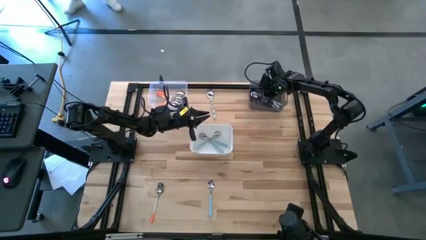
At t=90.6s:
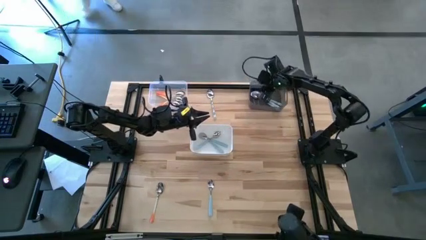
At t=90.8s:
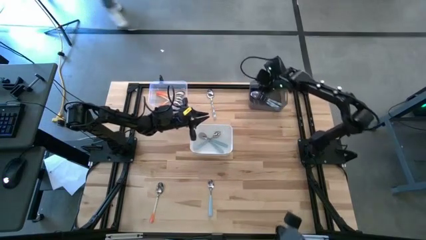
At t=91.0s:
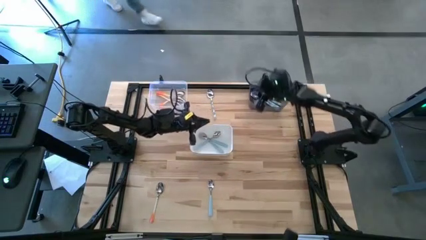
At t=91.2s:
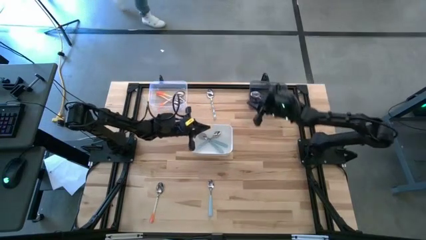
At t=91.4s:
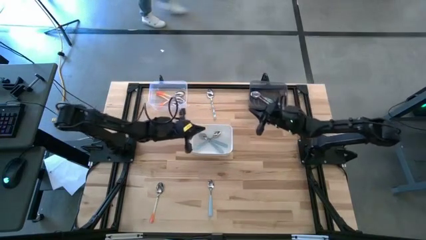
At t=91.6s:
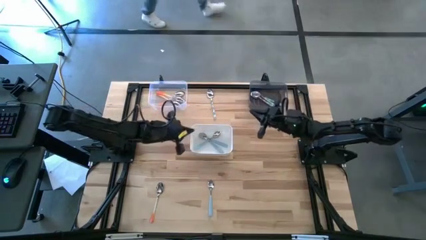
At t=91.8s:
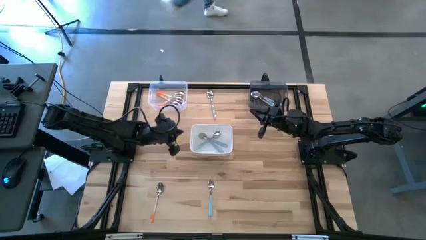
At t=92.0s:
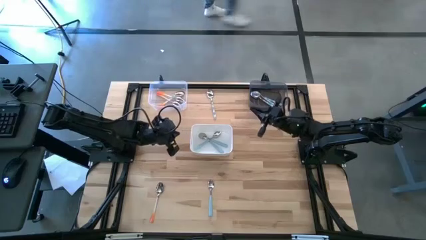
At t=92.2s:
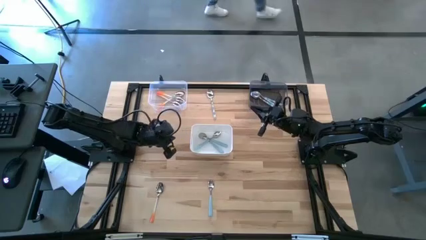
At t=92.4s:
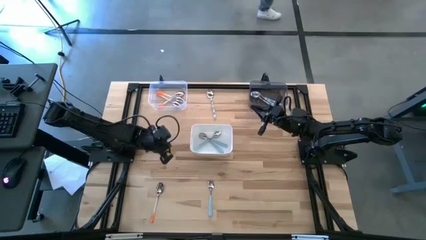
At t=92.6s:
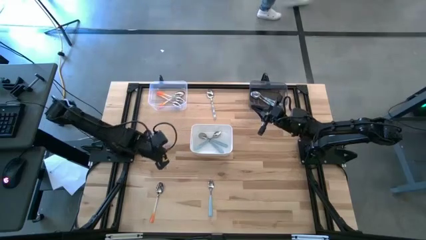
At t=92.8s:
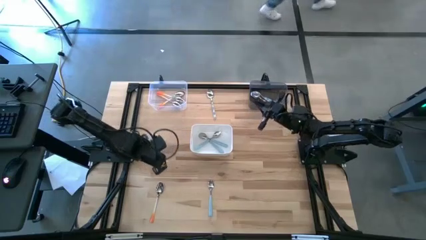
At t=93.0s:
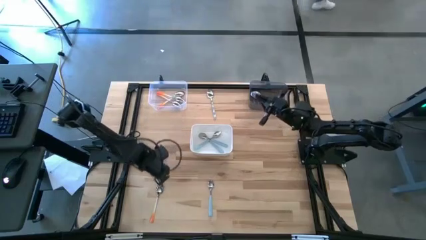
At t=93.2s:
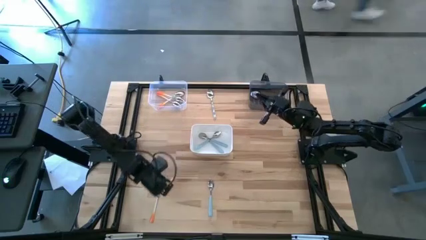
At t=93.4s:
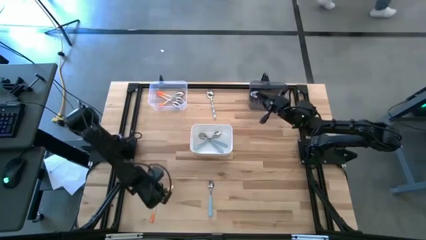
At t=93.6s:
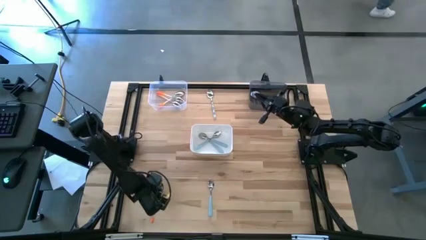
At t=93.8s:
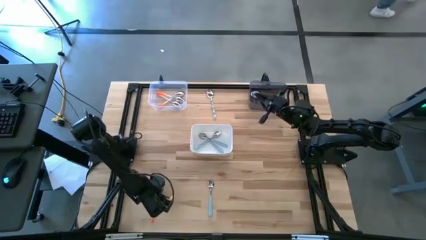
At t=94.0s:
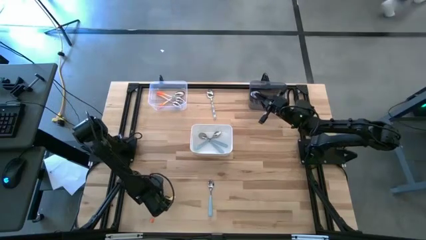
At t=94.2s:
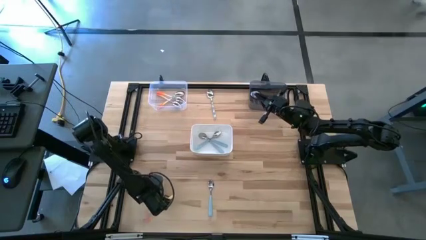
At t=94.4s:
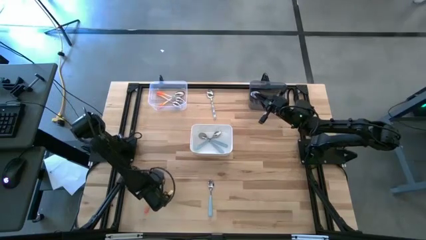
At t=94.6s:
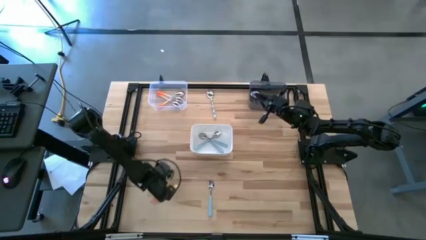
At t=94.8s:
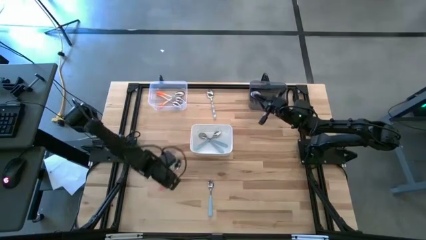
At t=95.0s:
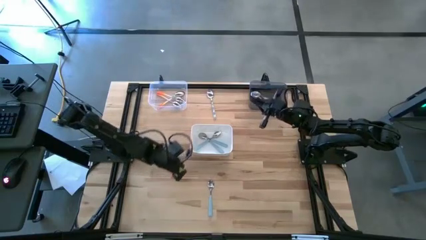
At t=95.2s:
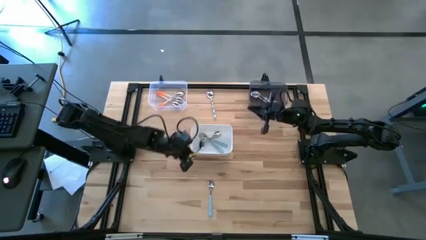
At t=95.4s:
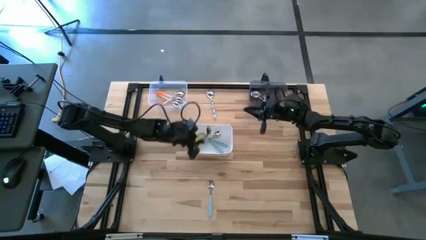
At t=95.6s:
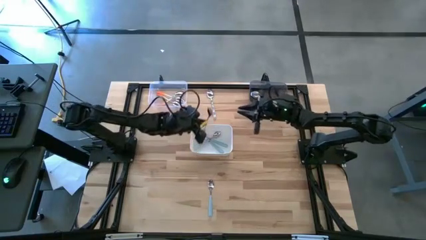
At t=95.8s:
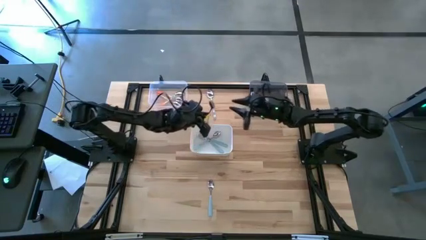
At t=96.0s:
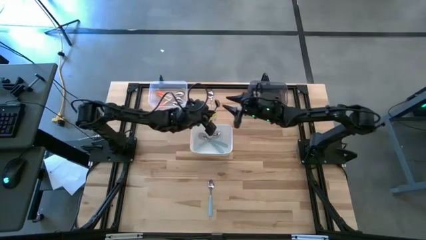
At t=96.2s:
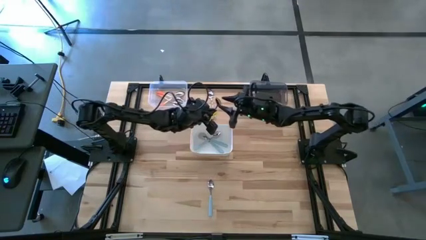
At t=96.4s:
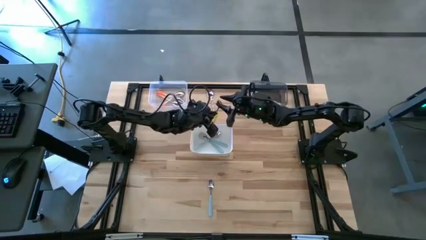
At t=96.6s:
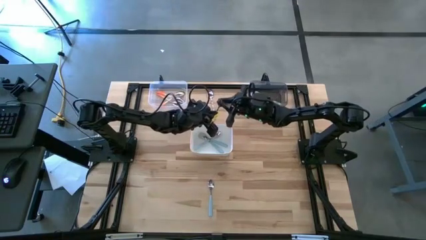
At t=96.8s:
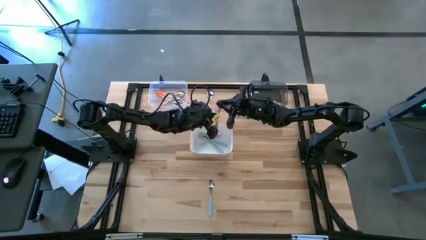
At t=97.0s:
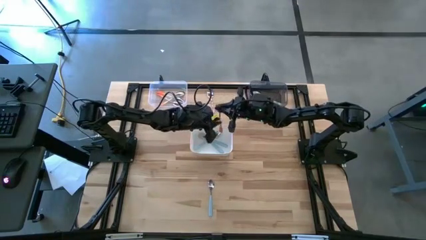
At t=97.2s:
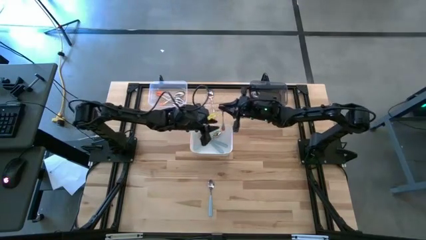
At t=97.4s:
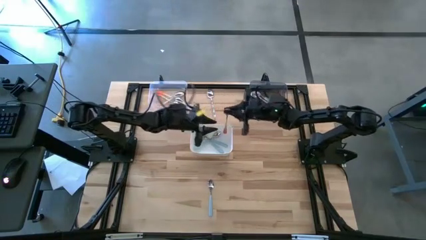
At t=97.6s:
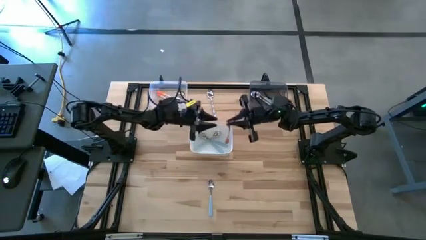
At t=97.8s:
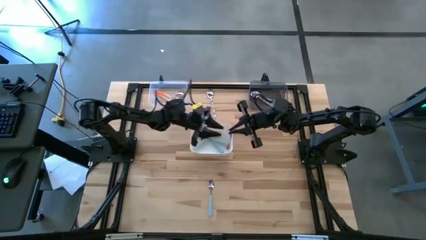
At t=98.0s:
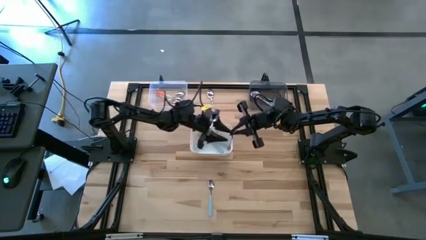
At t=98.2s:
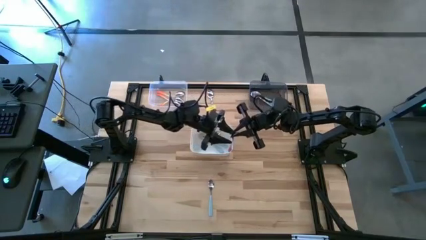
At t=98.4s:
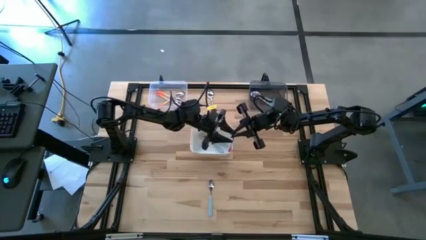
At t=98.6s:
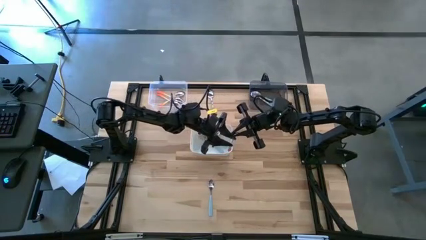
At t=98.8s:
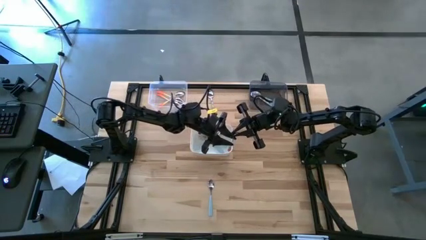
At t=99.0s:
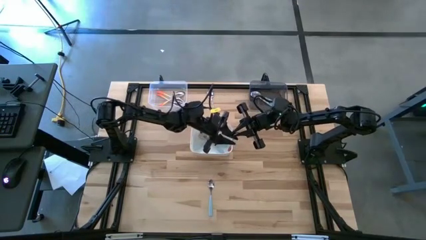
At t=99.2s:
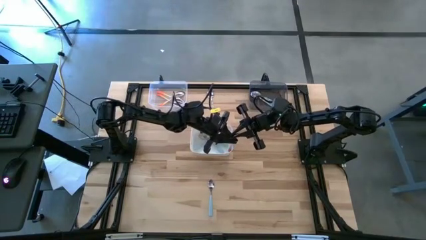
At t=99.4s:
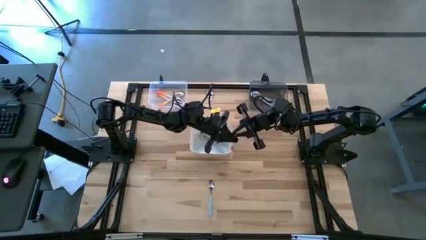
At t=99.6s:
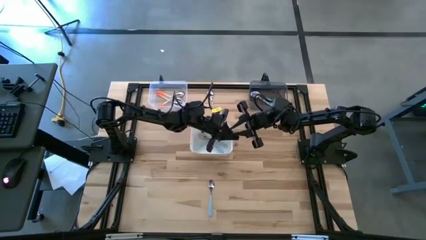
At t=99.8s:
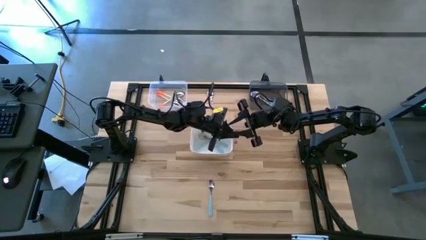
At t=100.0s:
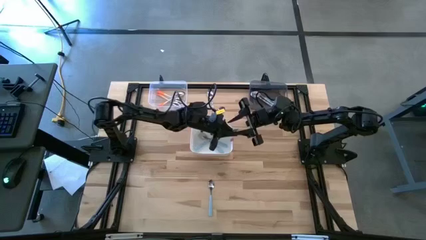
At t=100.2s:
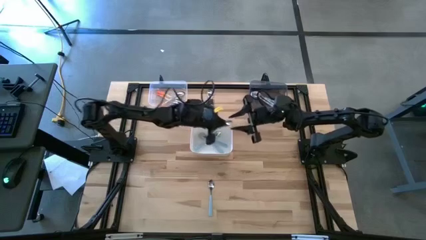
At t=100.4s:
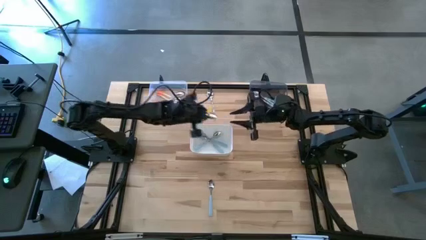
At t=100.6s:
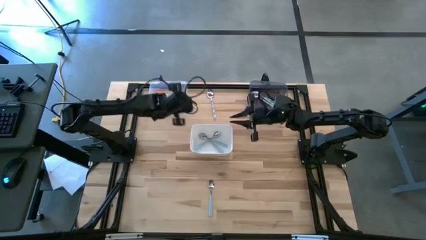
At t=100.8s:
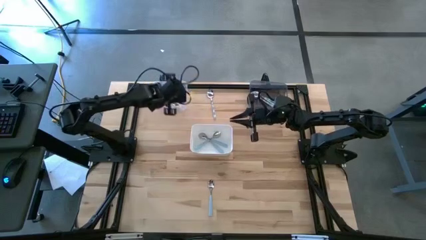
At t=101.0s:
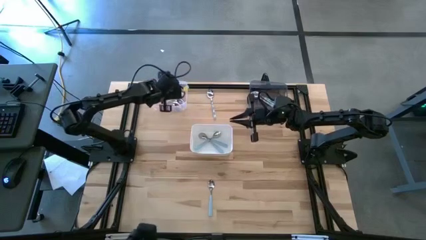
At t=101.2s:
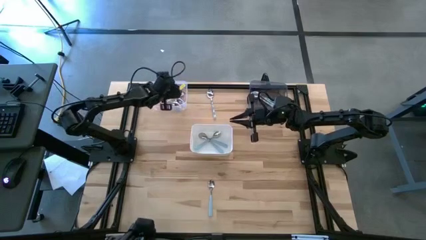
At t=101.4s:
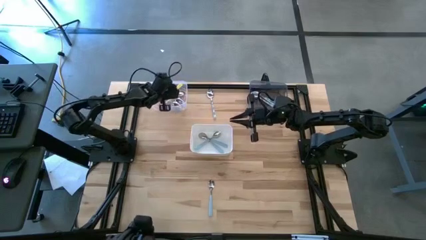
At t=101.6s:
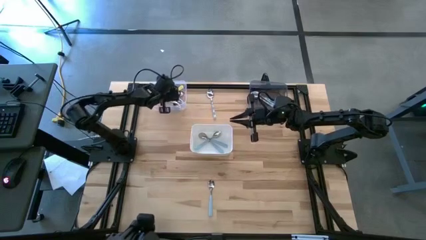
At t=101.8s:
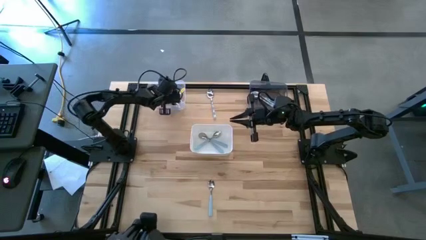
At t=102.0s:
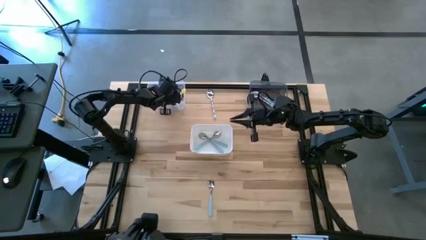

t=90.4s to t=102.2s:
Task: Sort silverware by color (type)
Put the orange spoon into the transparent bin

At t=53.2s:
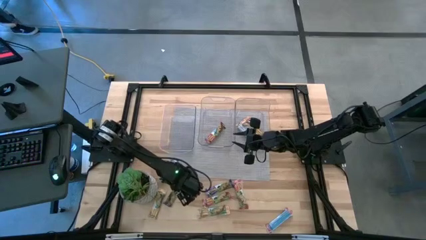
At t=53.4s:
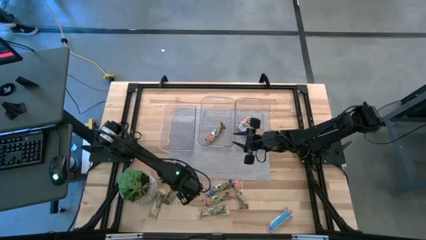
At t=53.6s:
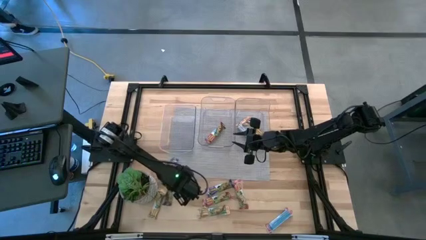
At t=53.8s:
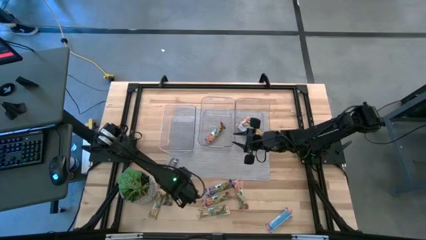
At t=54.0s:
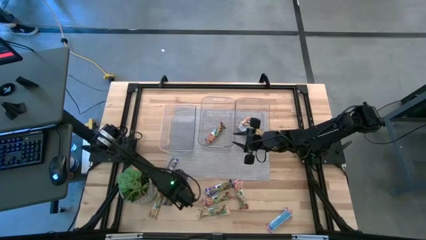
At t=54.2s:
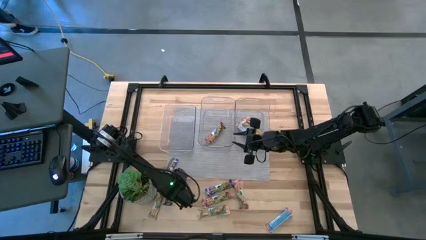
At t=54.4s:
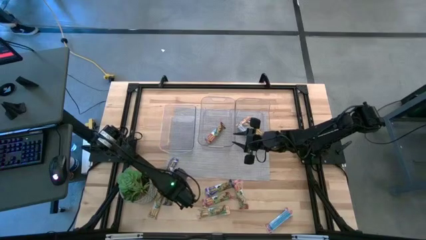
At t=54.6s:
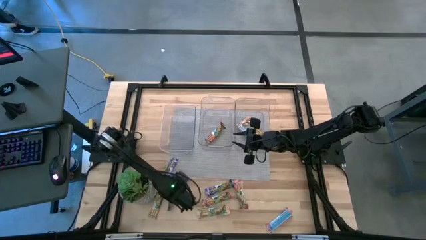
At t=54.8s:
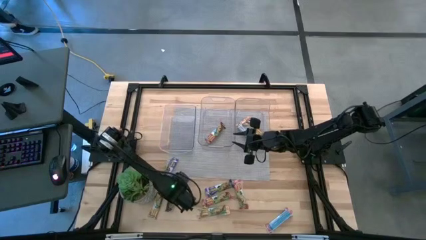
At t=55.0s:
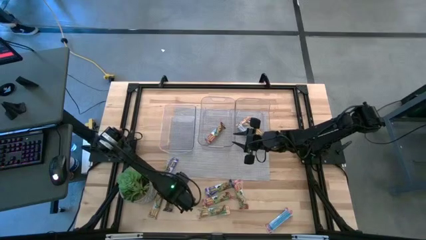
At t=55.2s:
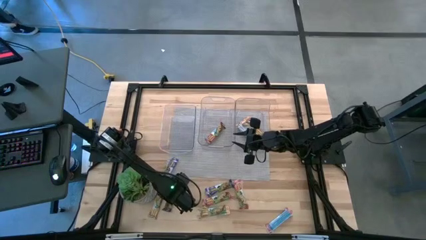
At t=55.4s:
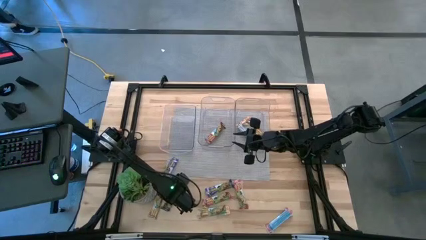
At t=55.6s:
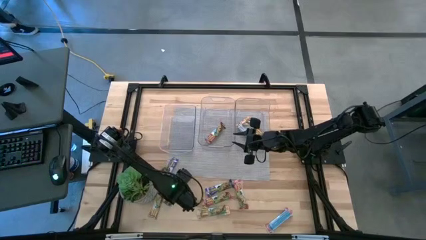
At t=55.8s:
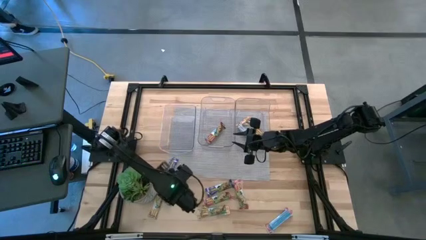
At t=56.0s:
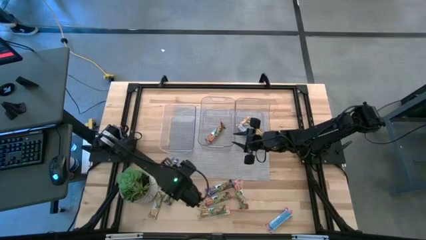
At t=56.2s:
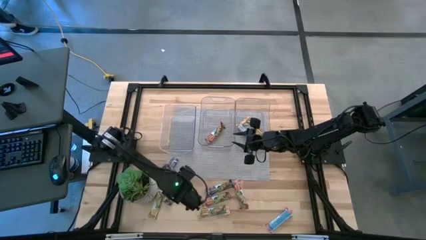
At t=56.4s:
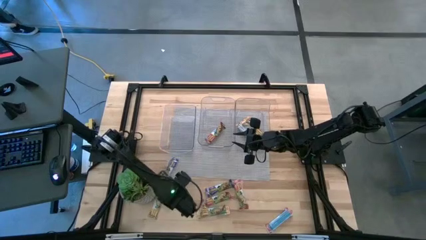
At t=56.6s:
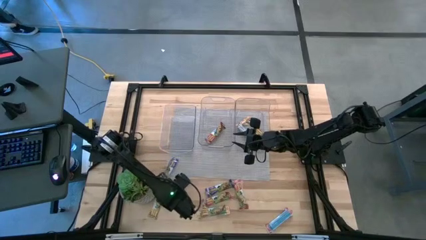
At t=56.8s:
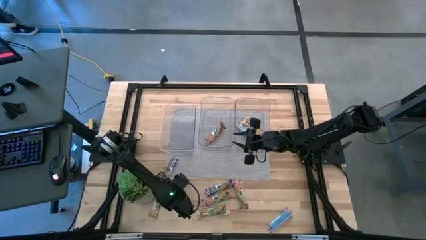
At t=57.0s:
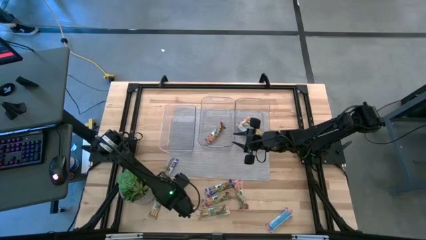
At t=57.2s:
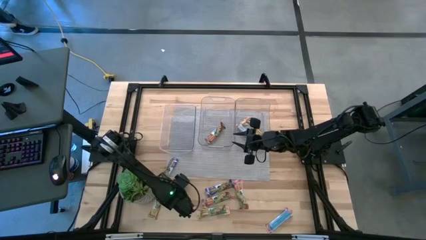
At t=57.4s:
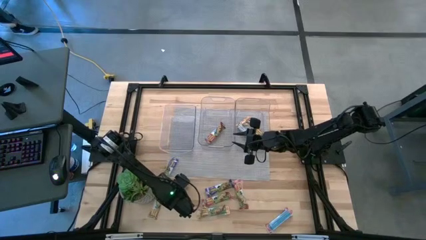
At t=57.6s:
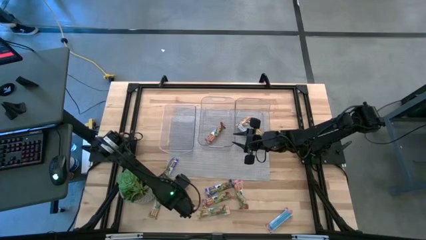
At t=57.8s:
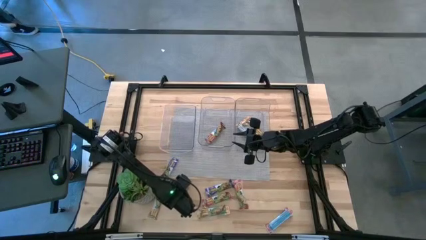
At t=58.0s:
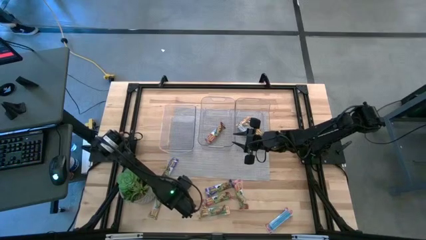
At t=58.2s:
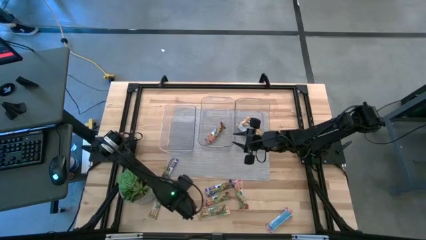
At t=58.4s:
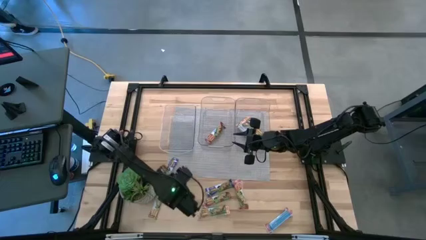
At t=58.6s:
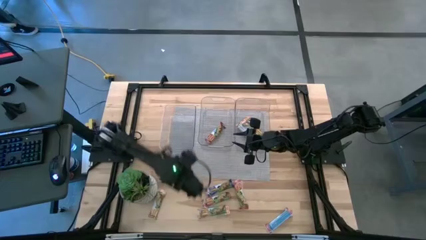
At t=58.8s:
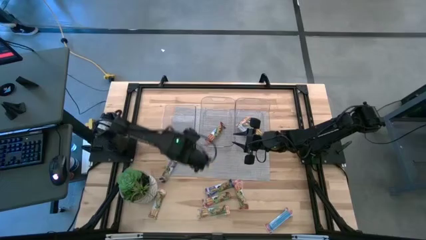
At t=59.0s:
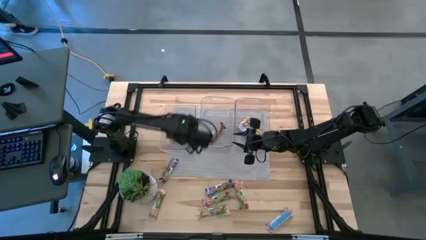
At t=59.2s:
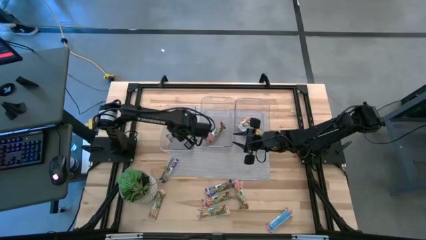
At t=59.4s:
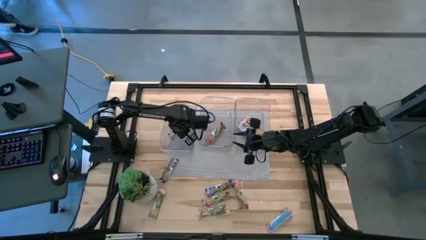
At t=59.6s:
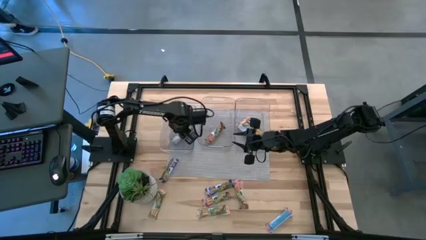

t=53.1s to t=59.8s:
Task: Pick and place Granola Bars by type
Put the blue granola bar into the left transparent bin
